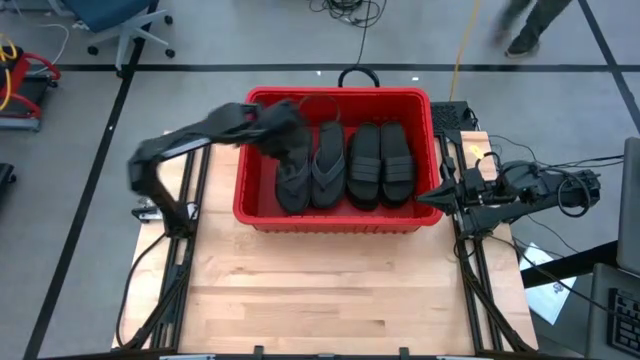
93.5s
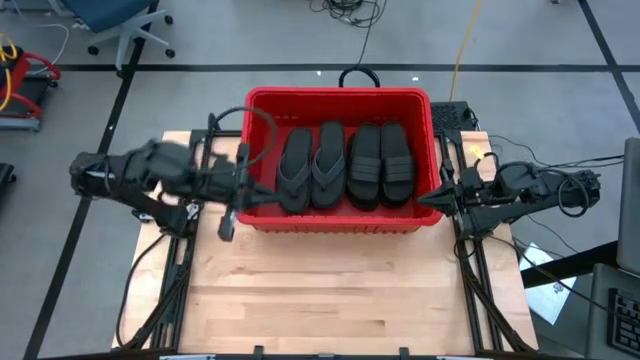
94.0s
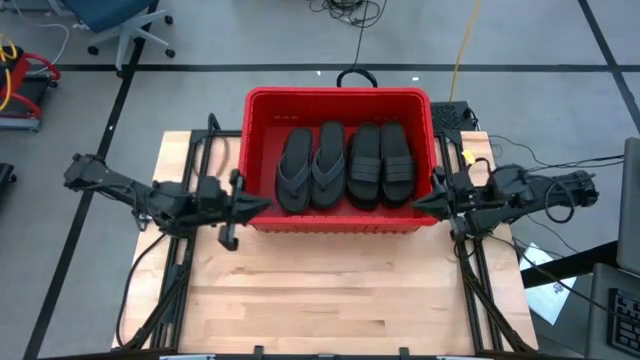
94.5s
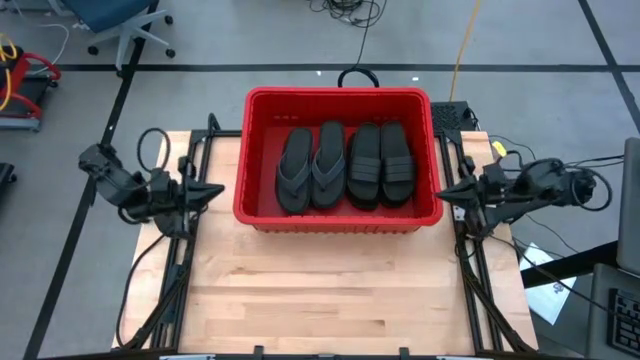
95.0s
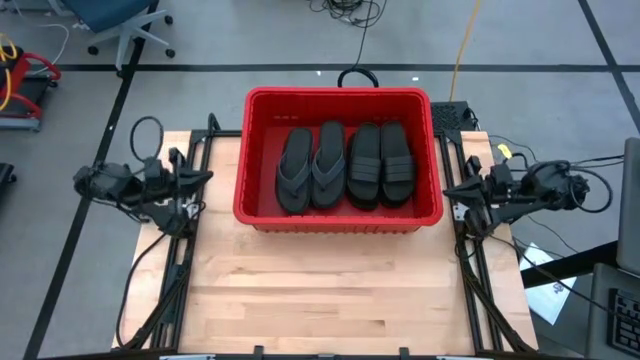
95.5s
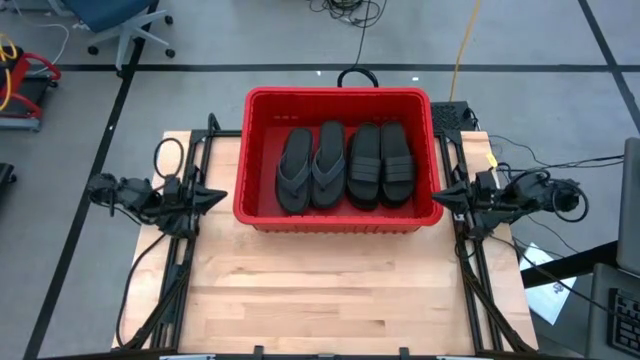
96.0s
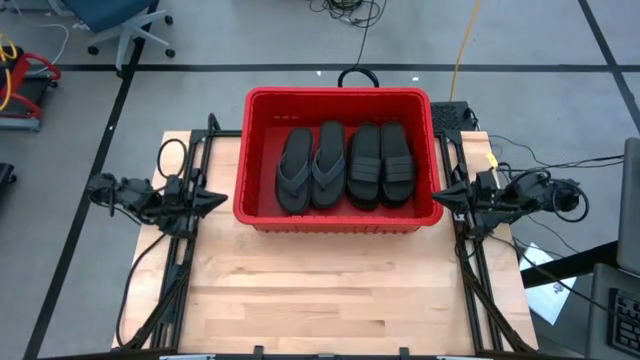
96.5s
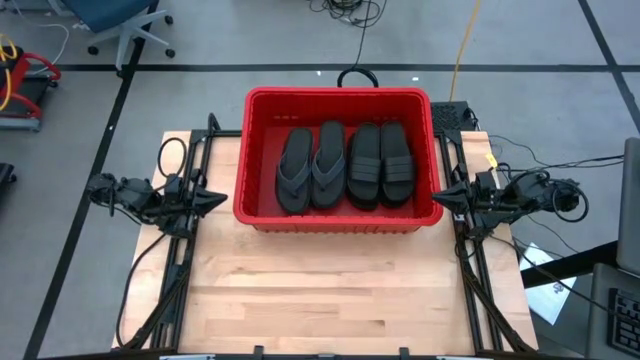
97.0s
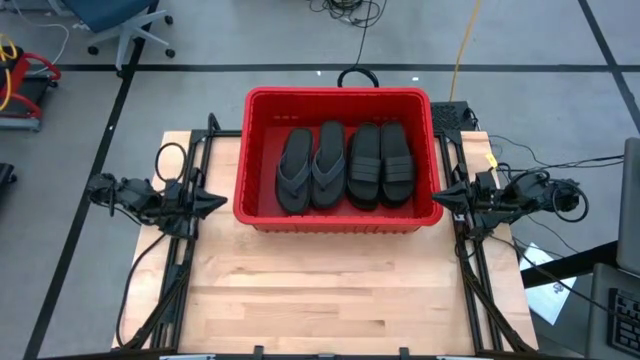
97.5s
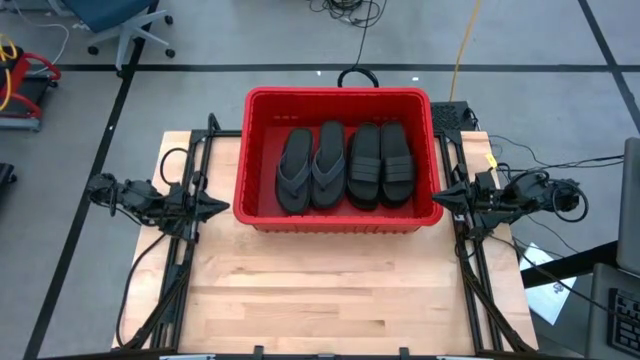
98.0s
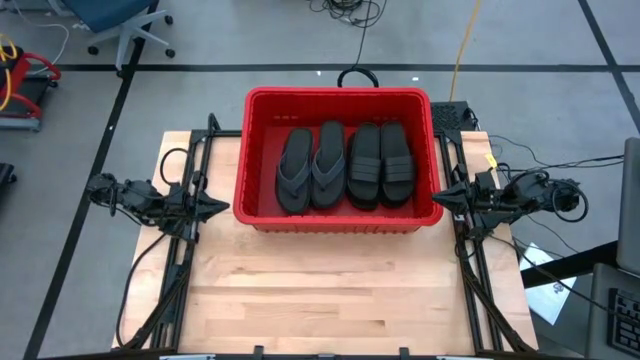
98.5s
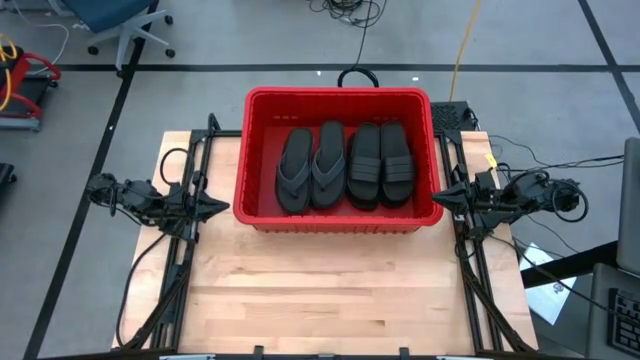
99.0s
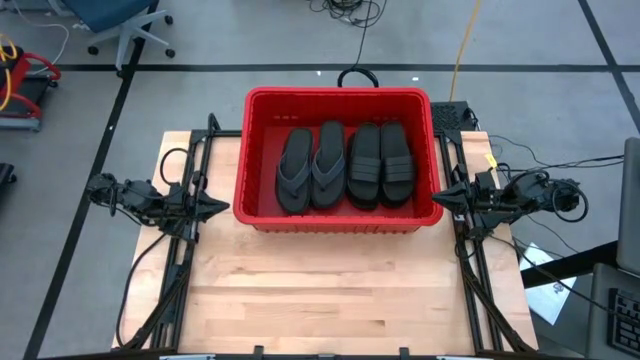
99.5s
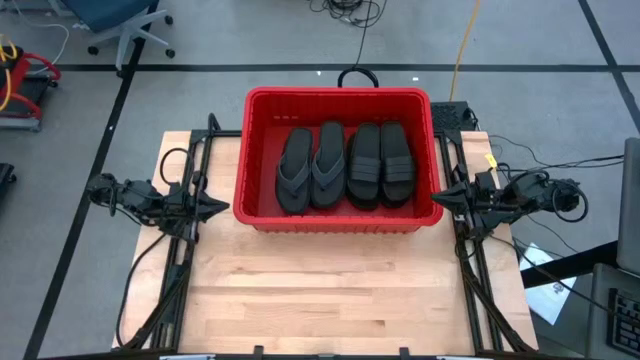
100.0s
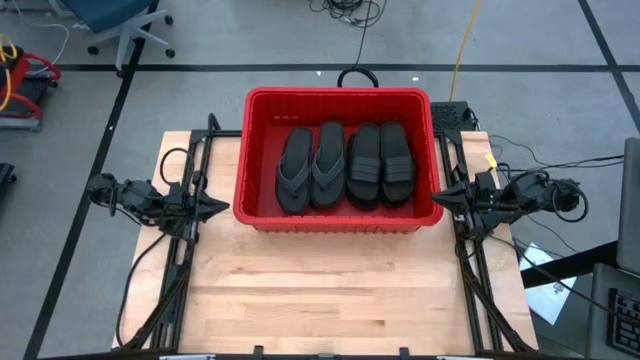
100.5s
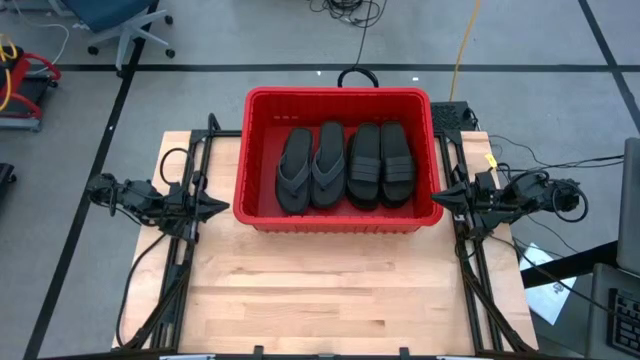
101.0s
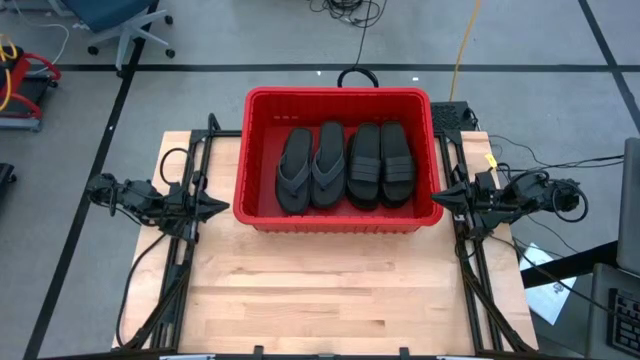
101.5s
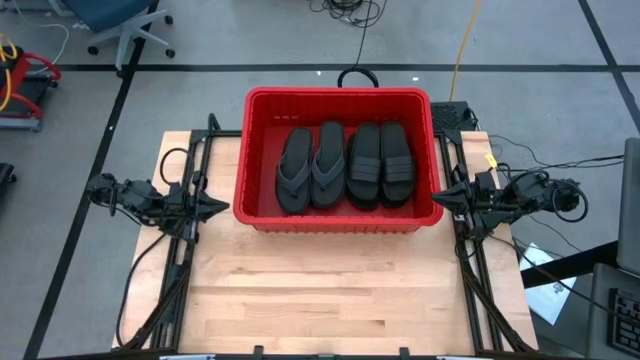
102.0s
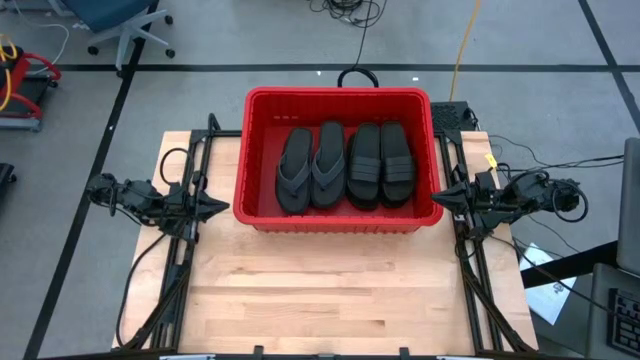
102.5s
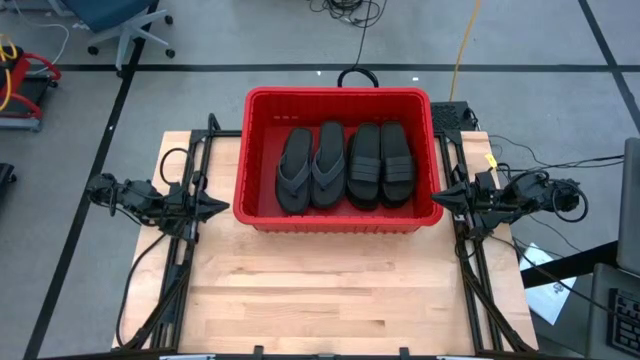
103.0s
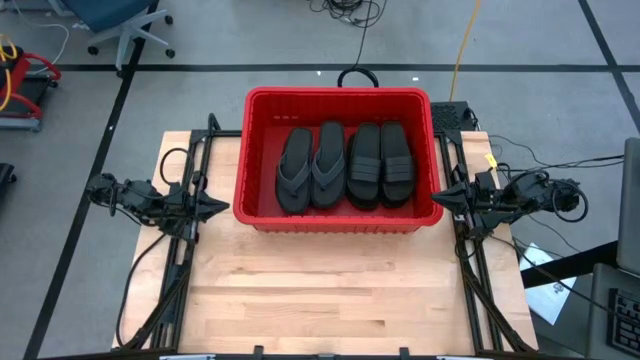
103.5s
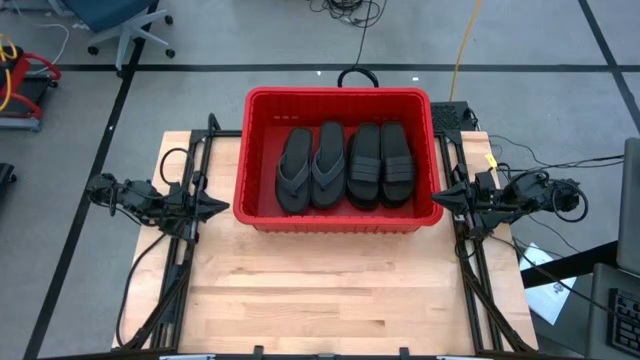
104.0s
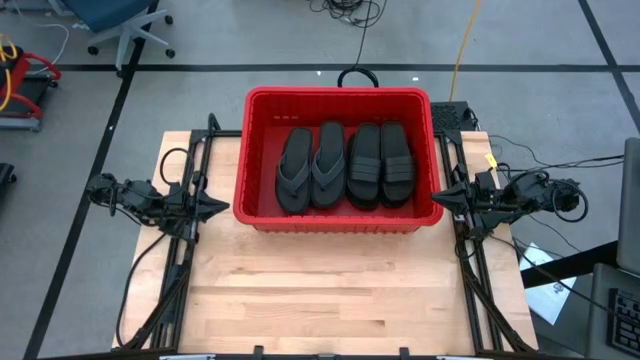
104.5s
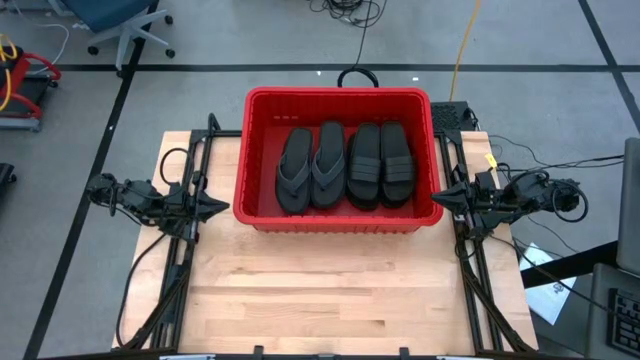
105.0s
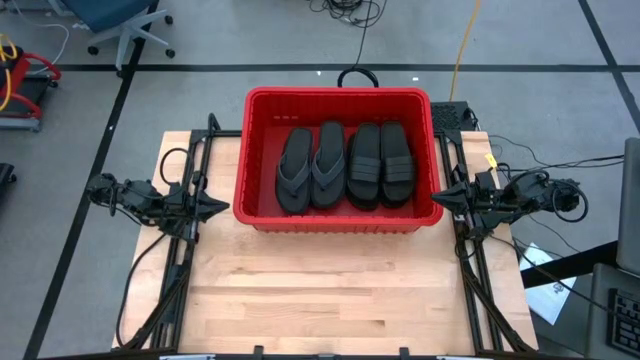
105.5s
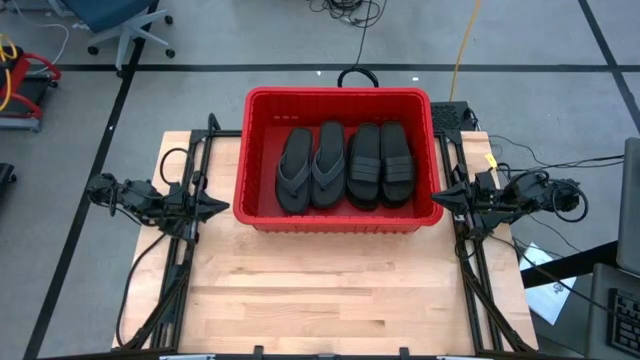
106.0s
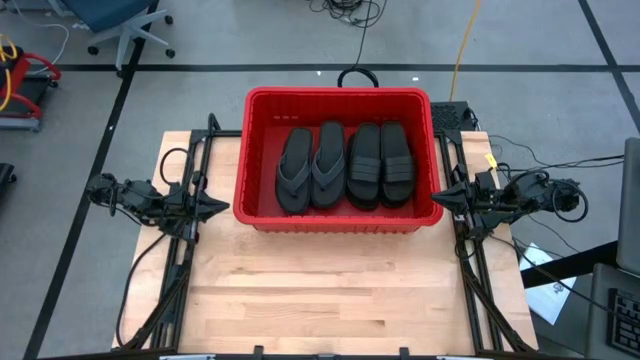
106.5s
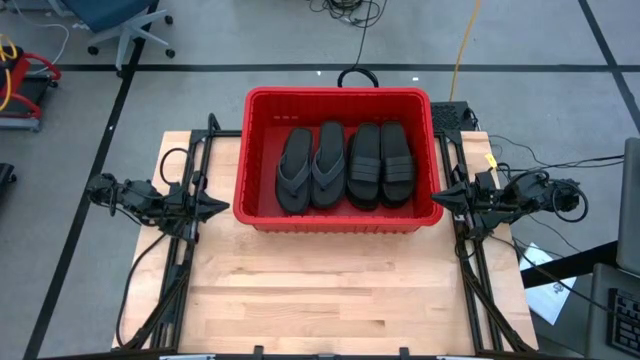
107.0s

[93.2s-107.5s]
Task: Pick and place slides into bin
Return to Home Position

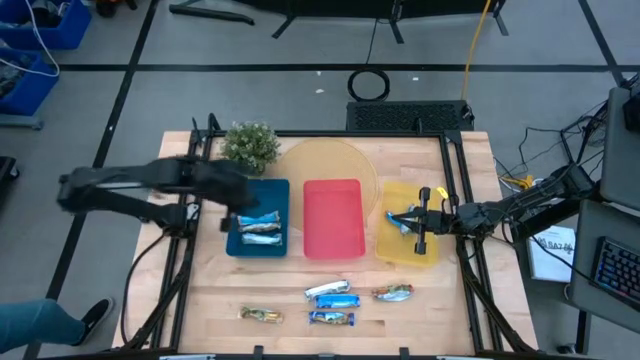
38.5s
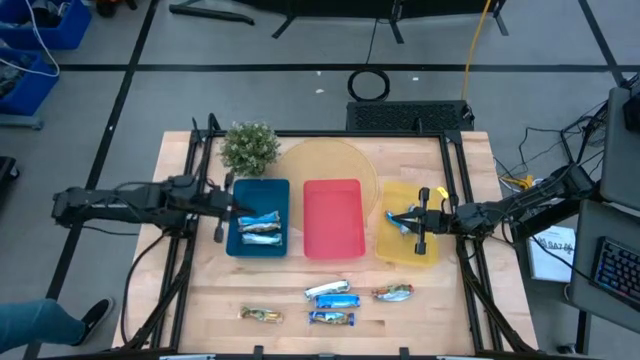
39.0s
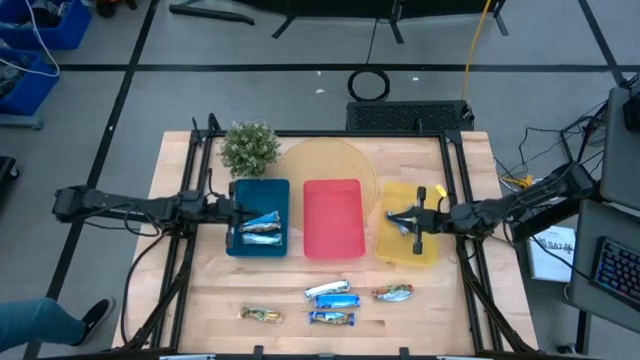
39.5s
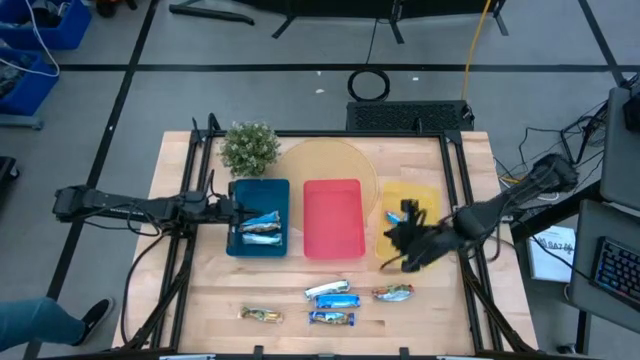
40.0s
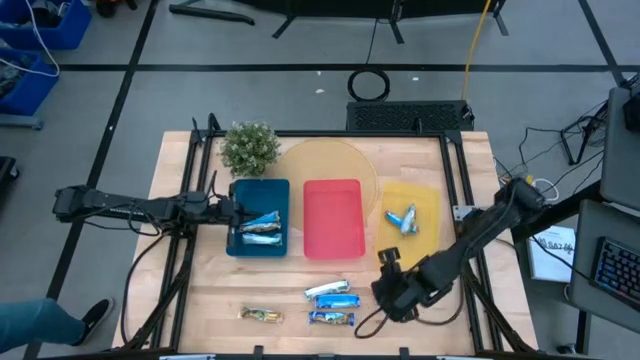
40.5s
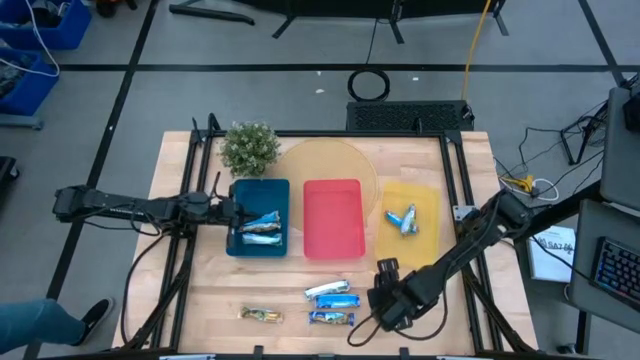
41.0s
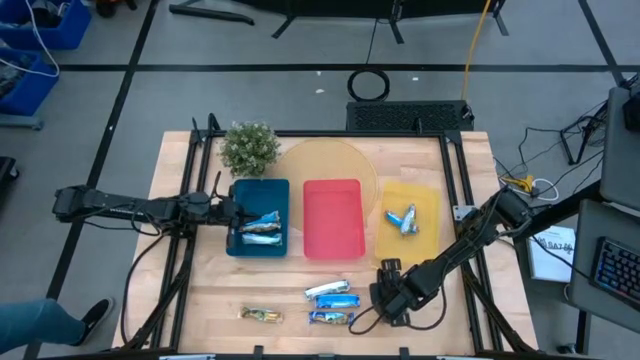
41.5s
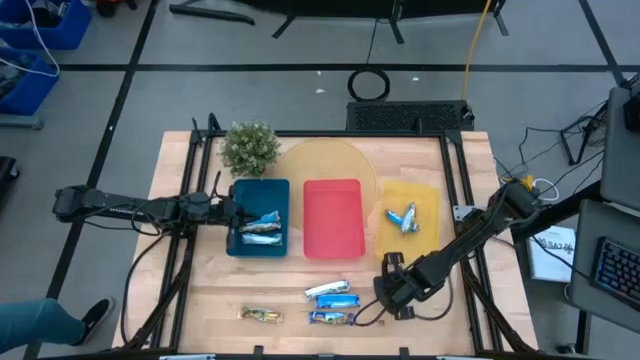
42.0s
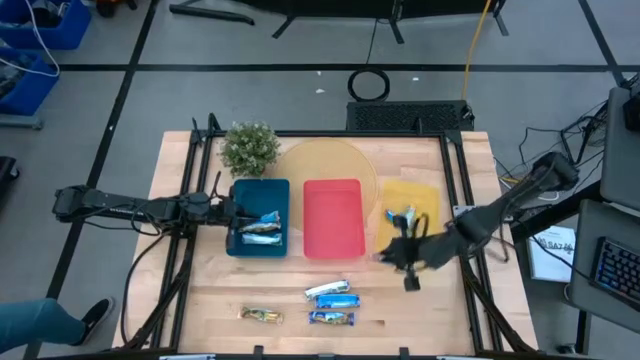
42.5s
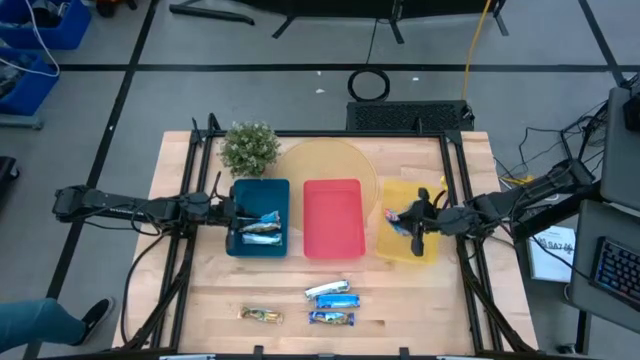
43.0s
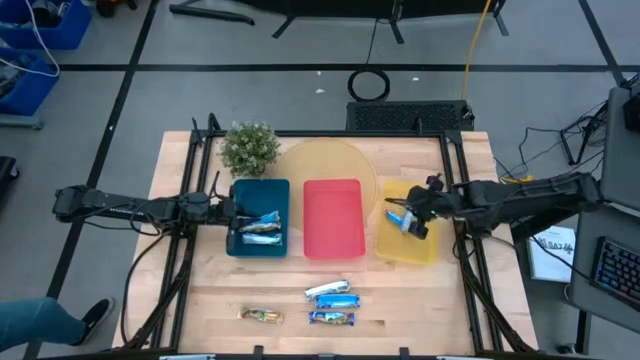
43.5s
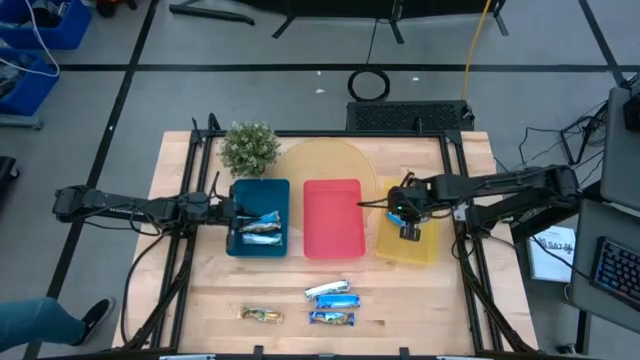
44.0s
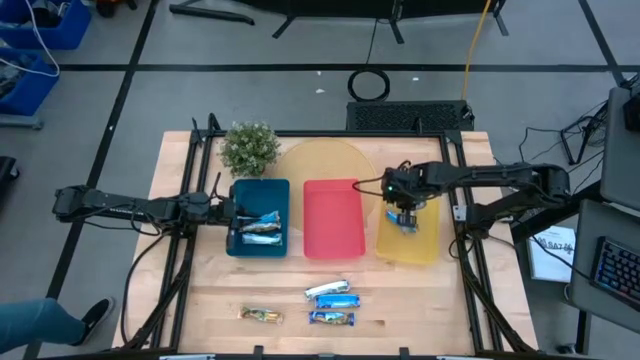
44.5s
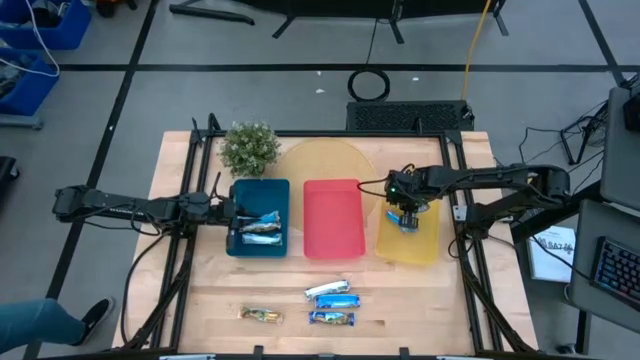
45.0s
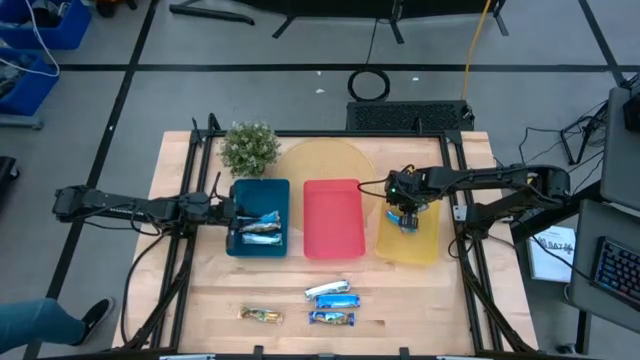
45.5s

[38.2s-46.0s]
Task: Pick and place Granola Bars by type
Put the red granola bar into the yellow bin
